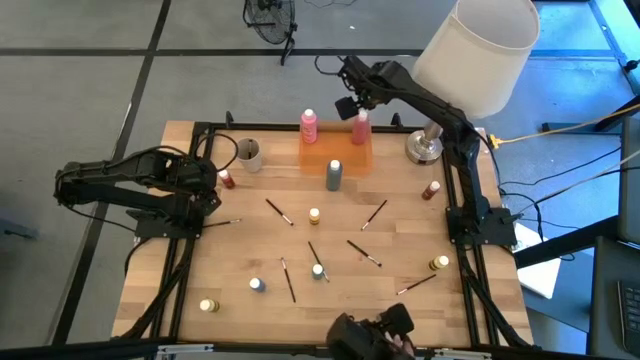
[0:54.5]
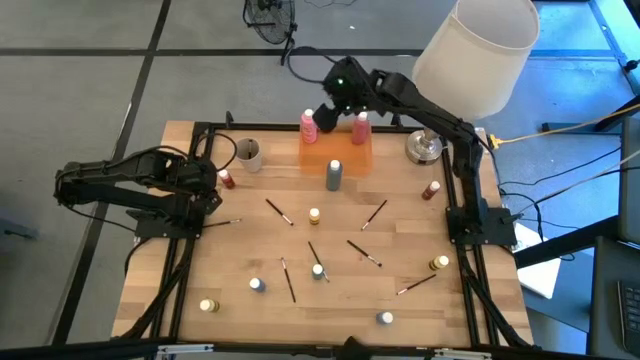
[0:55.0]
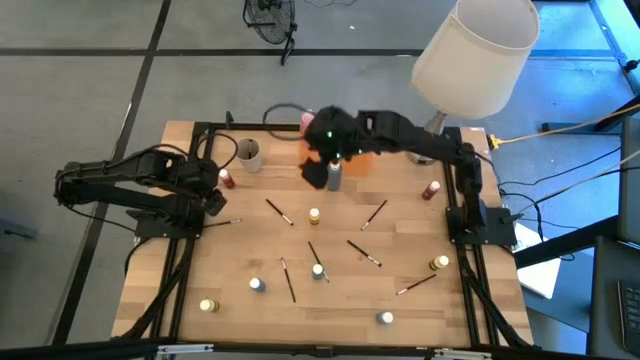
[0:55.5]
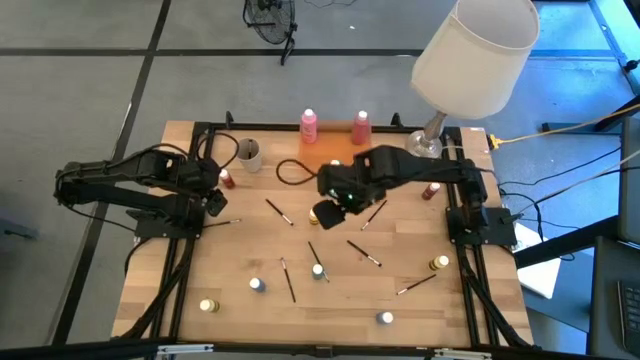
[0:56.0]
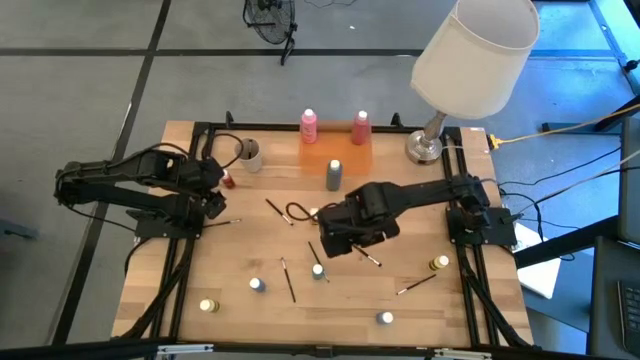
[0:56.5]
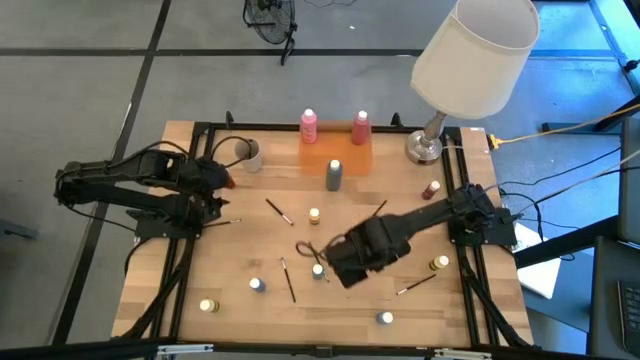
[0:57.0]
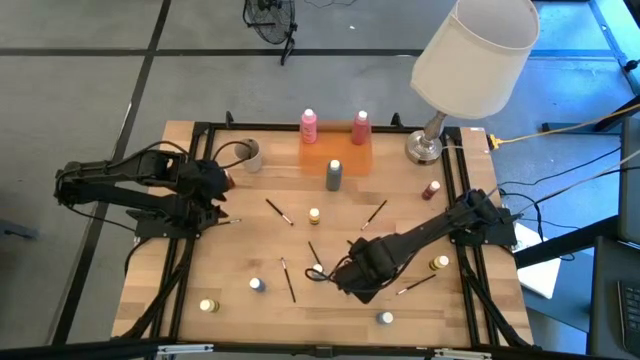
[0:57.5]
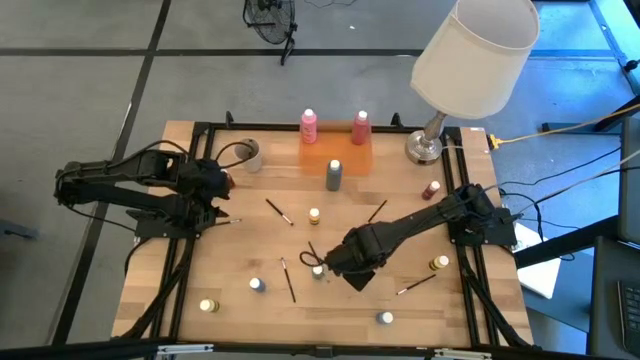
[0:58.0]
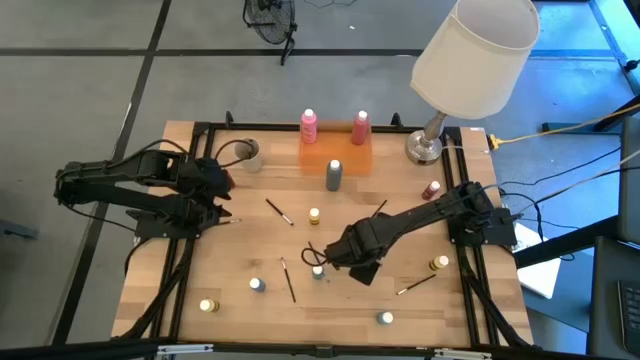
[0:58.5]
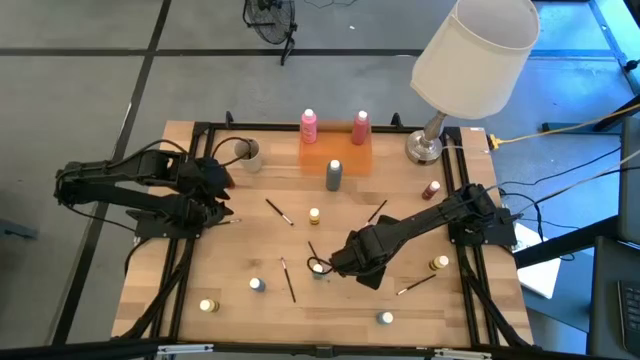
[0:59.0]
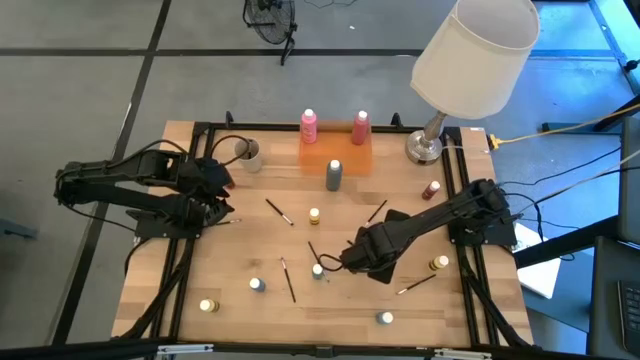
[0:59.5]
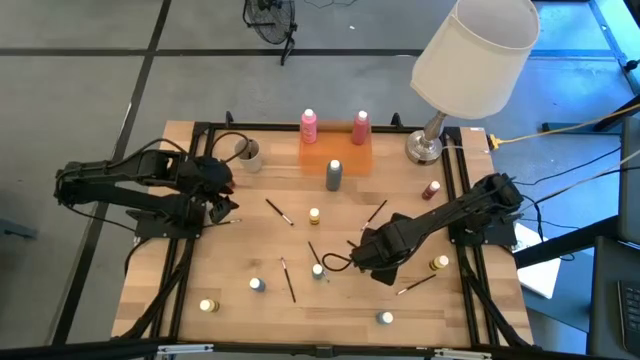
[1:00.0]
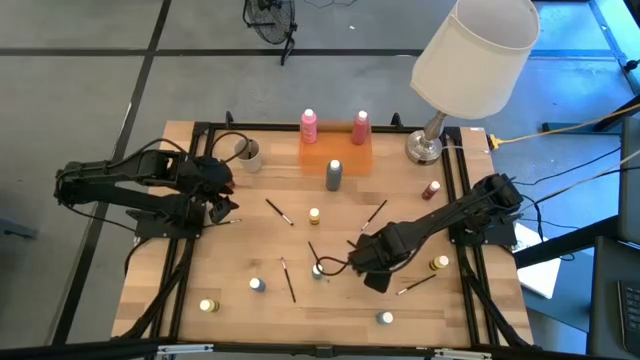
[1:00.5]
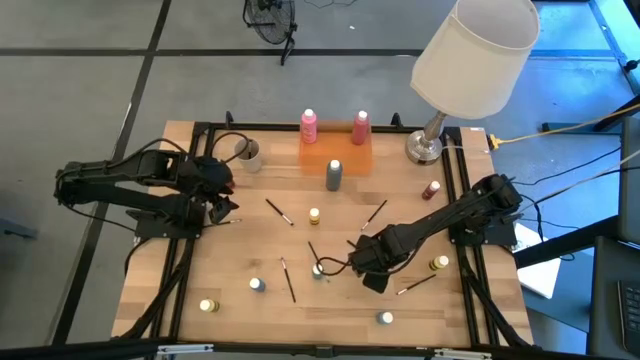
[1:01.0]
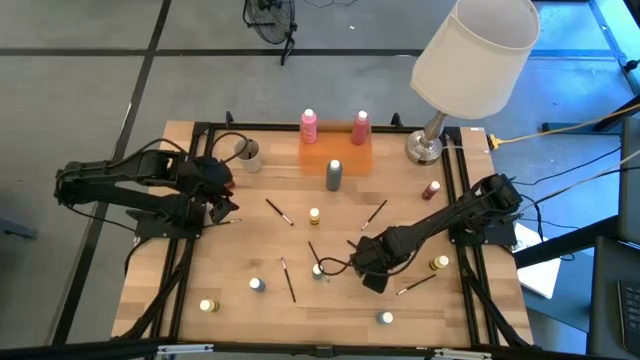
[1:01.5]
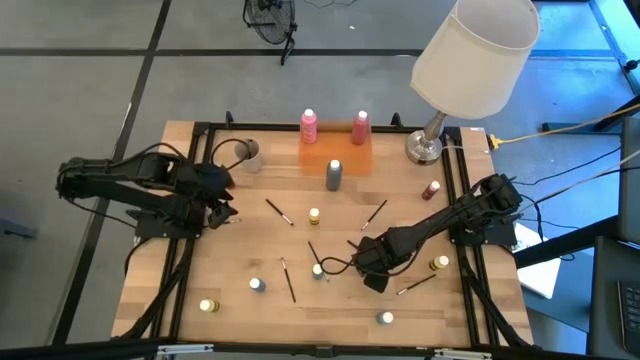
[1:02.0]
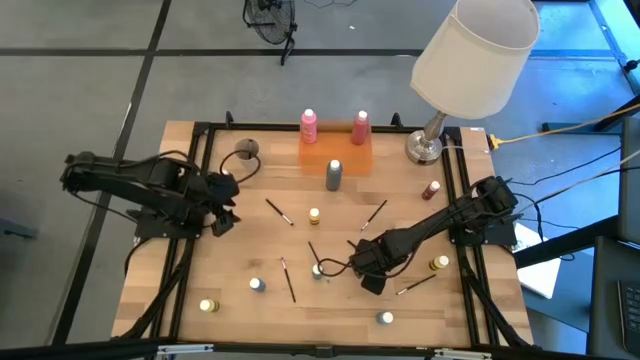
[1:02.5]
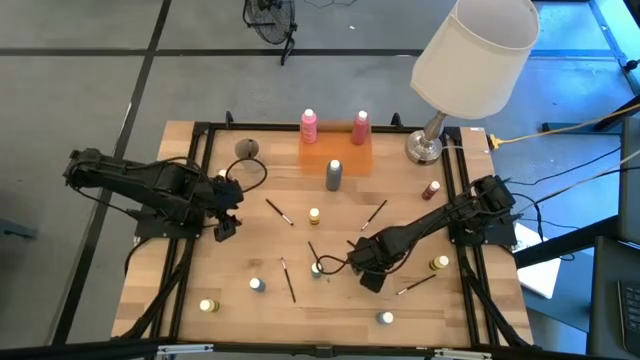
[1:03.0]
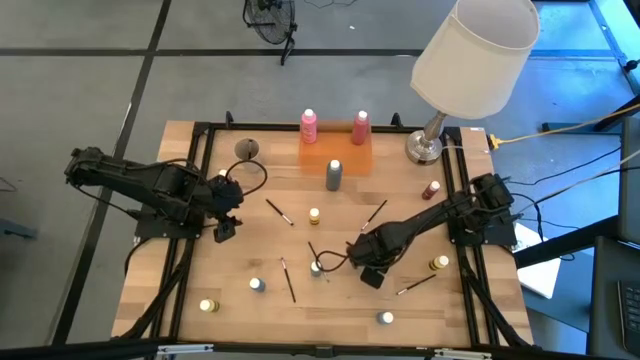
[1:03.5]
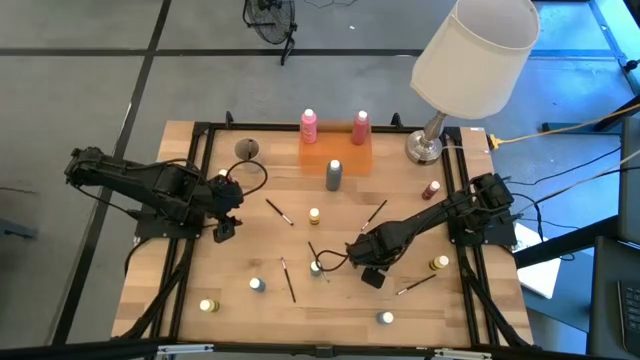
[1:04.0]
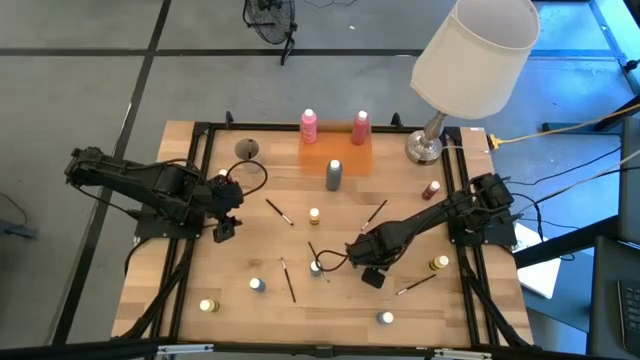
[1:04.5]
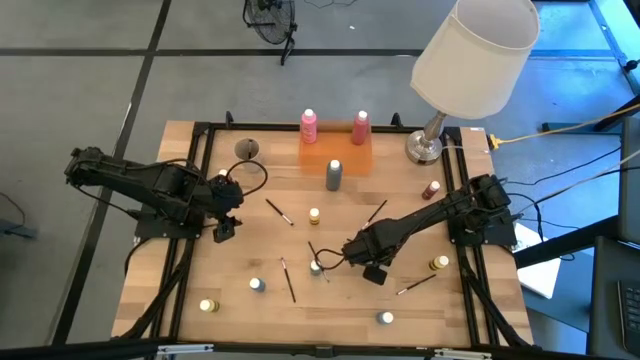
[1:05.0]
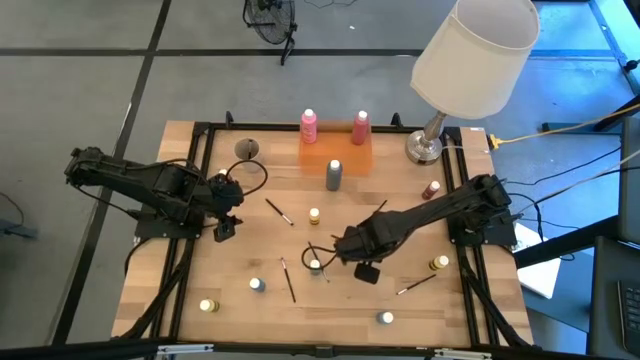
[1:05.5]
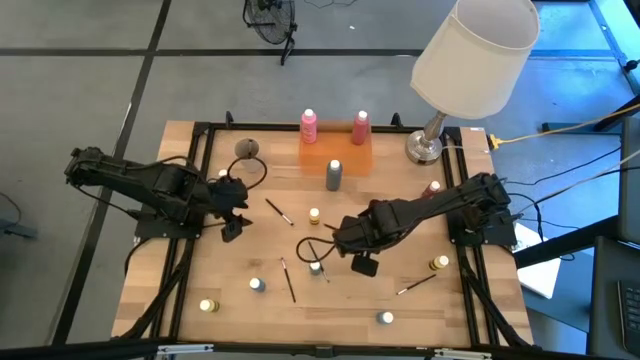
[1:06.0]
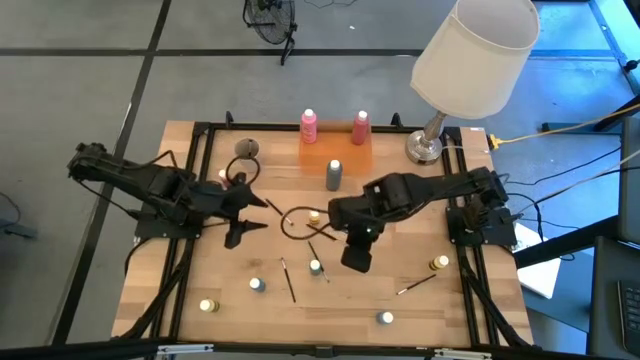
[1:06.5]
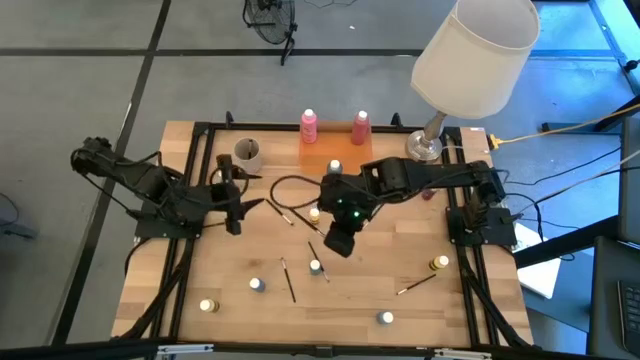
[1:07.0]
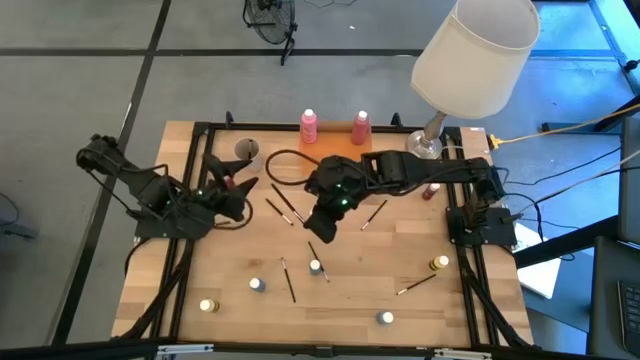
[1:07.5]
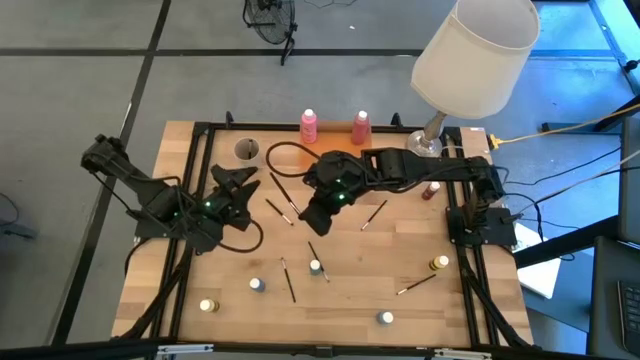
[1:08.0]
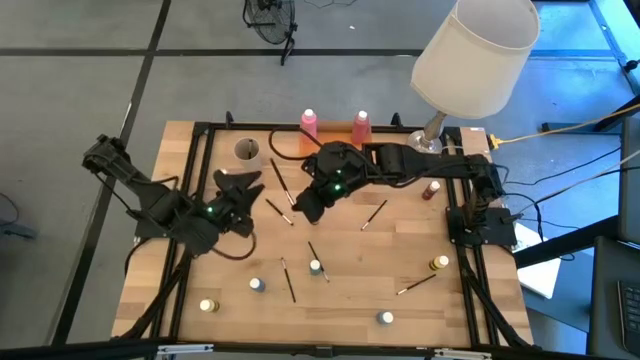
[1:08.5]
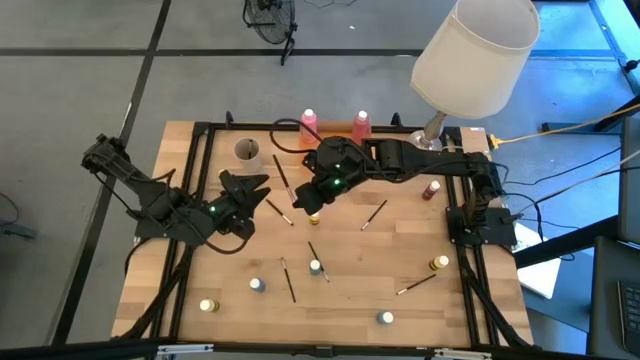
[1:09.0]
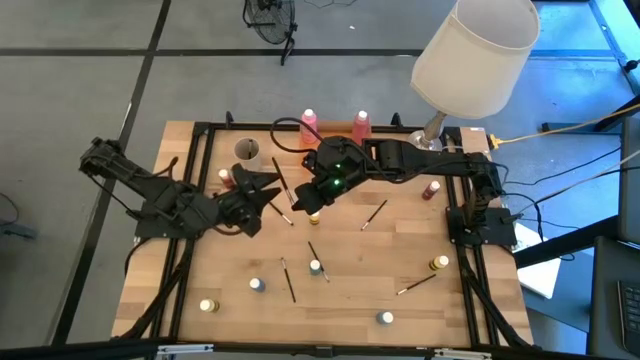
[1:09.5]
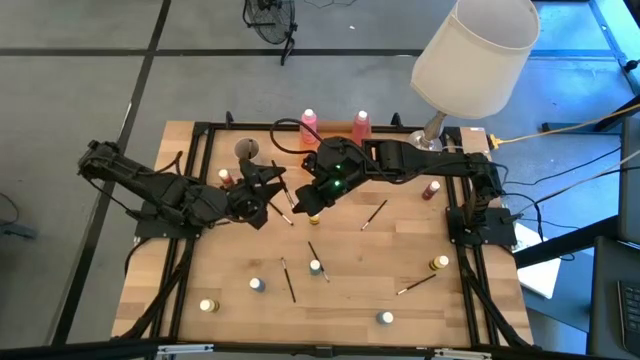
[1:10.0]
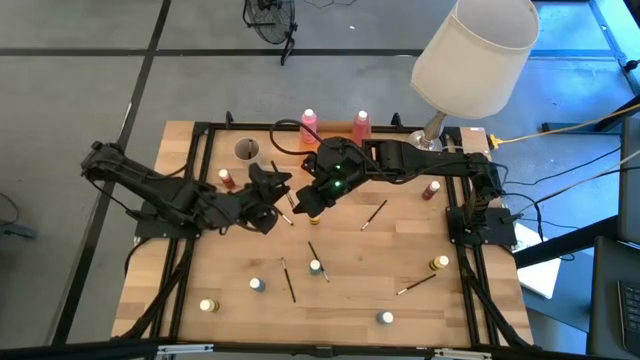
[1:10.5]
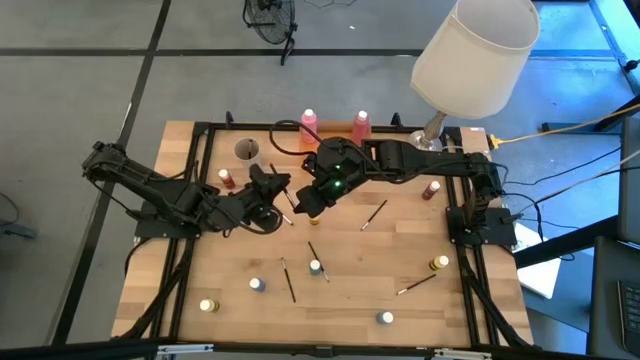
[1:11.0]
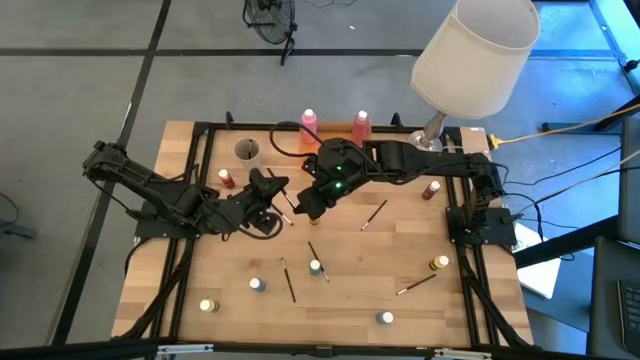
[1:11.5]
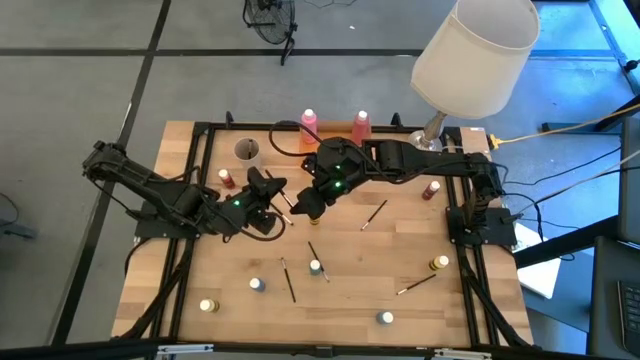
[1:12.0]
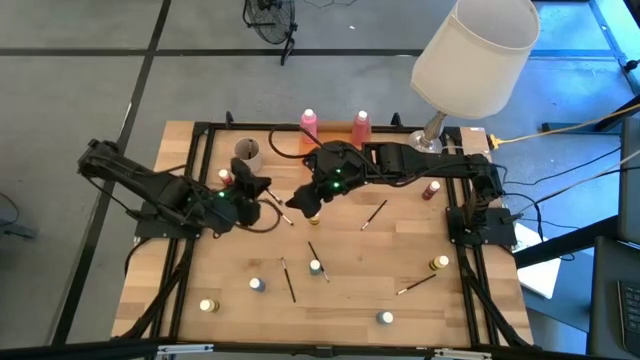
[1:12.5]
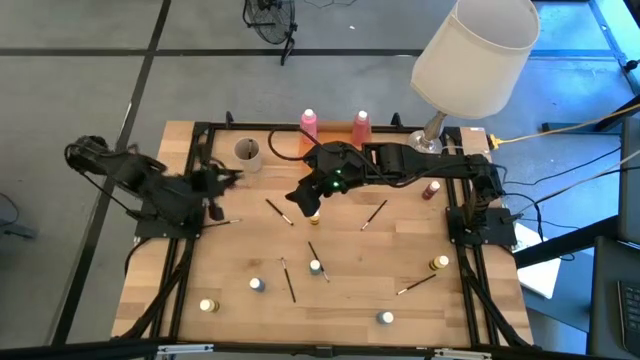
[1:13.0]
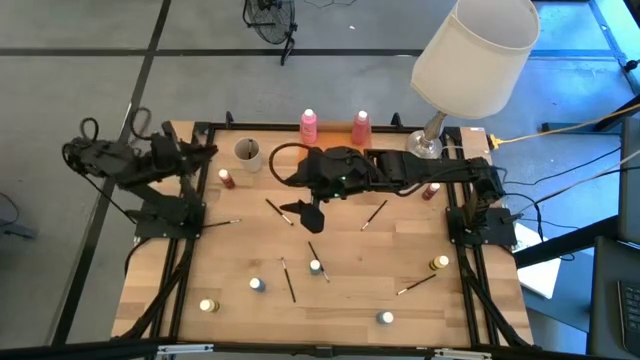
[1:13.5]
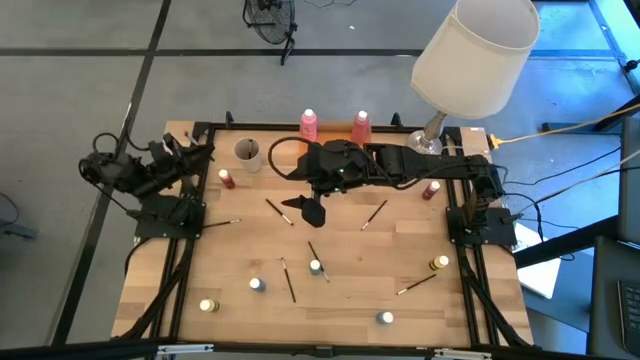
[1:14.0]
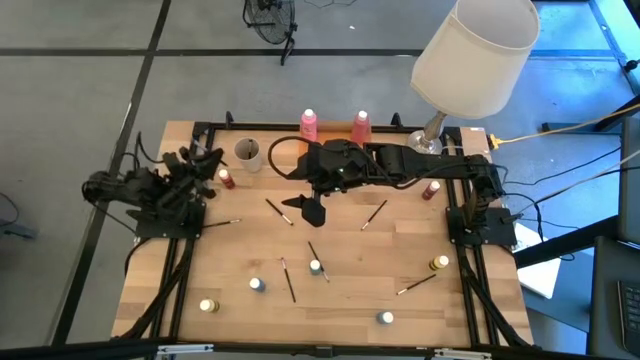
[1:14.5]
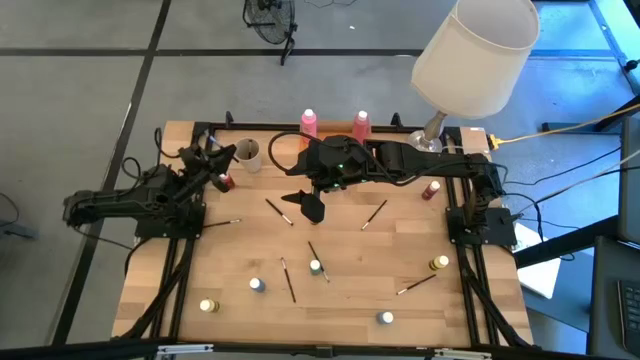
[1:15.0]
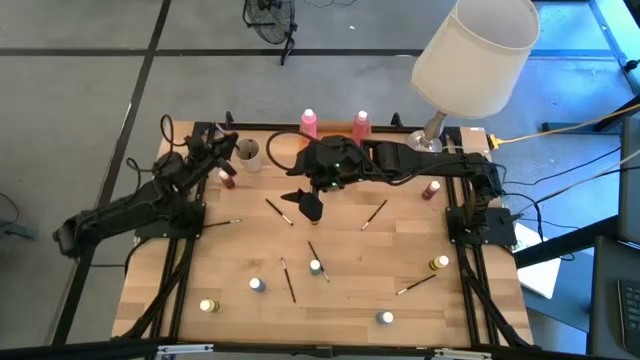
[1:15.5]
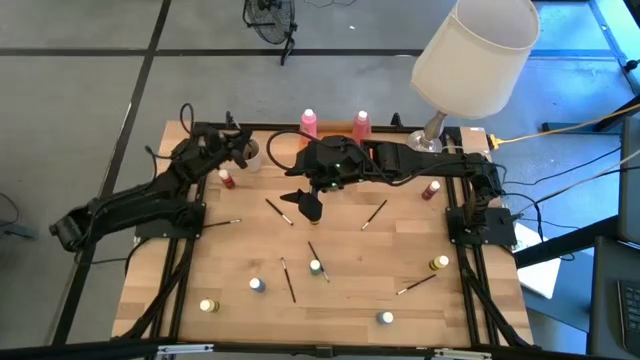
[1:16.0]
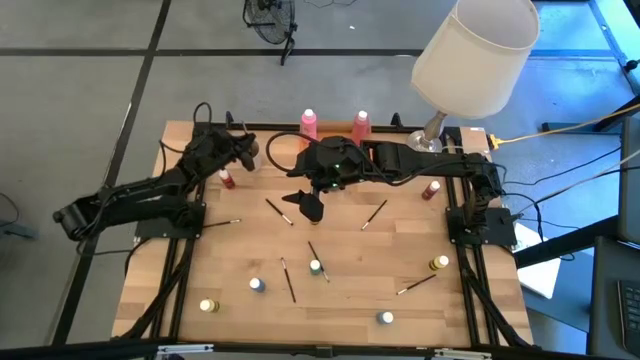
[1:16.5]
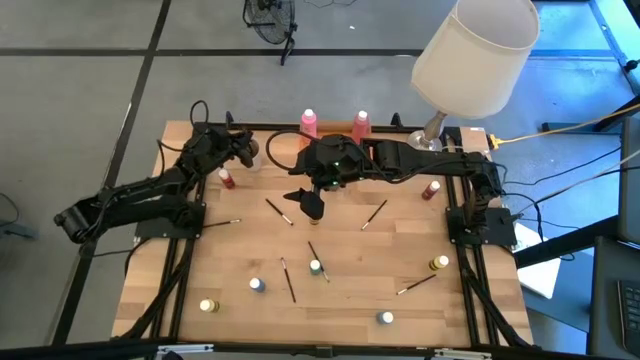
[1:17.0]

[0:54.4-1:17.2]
Task: Pick & Place Paint Supplies
Put the silver paint brush into the white cup
